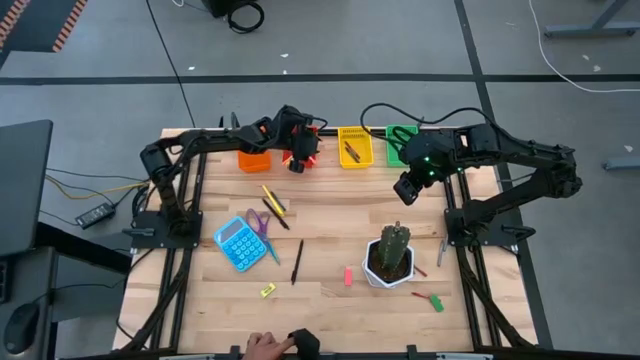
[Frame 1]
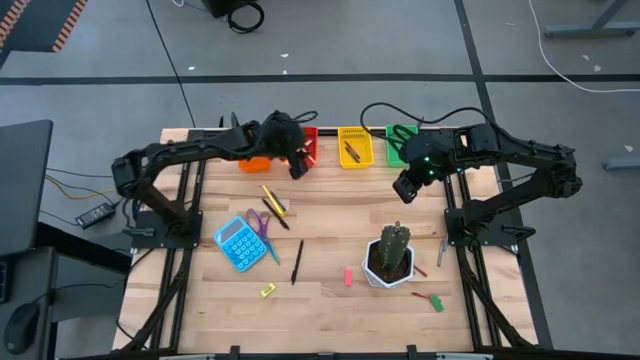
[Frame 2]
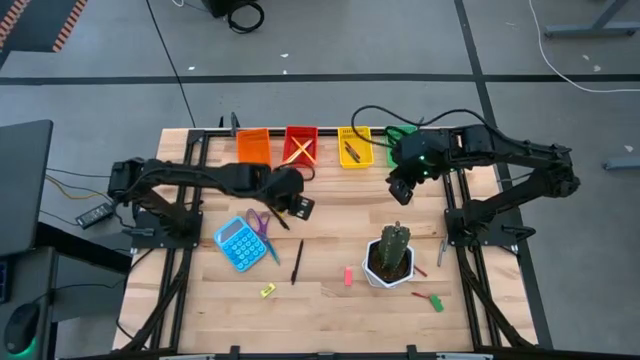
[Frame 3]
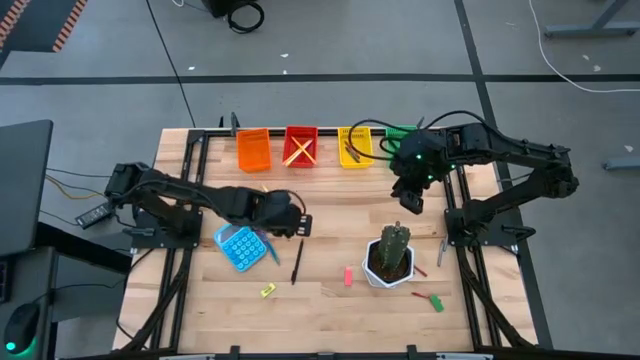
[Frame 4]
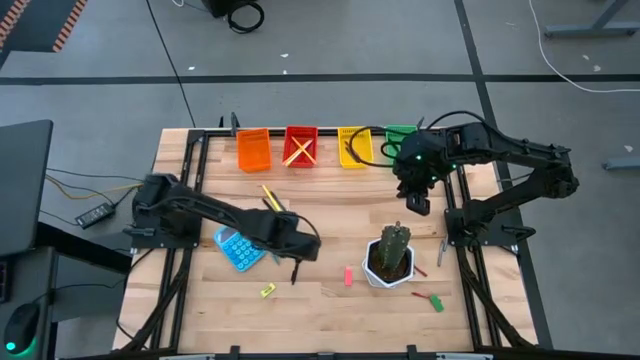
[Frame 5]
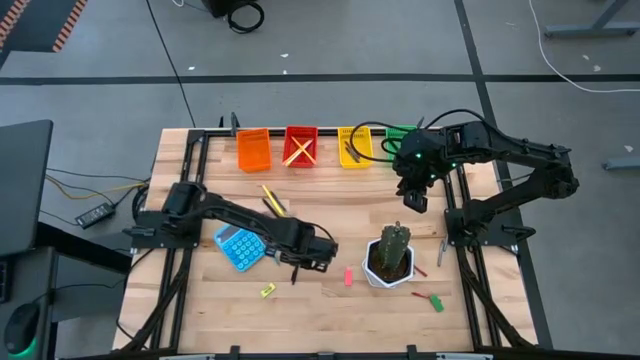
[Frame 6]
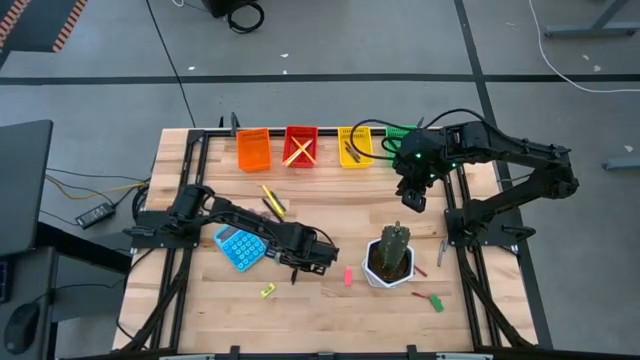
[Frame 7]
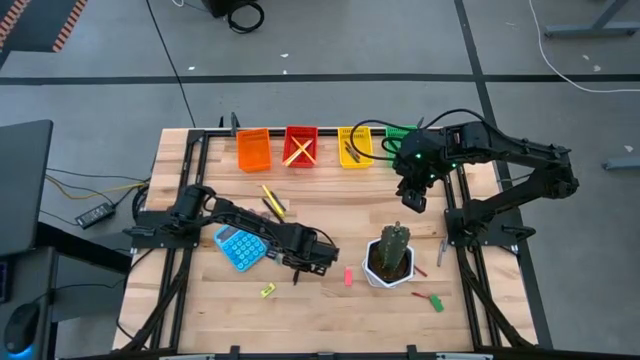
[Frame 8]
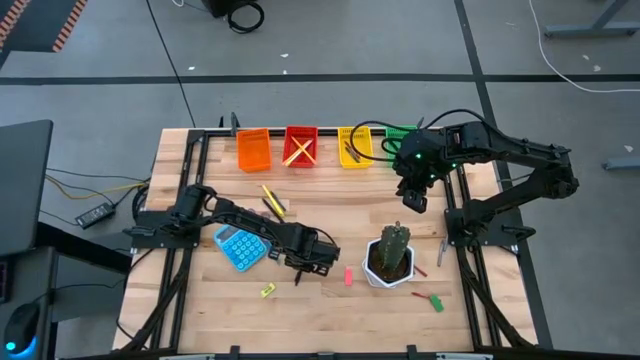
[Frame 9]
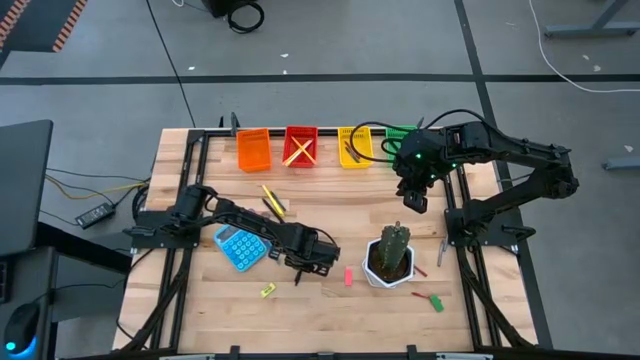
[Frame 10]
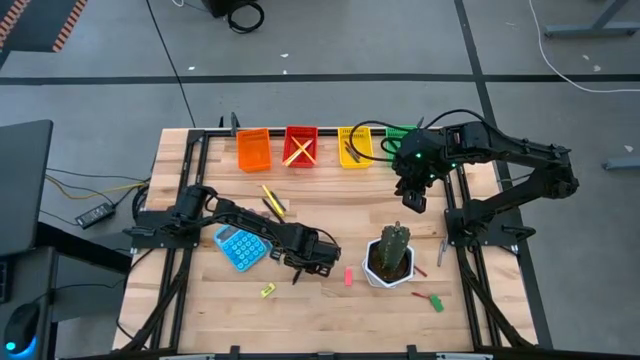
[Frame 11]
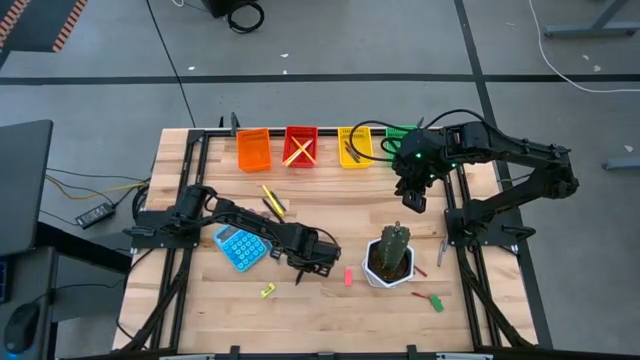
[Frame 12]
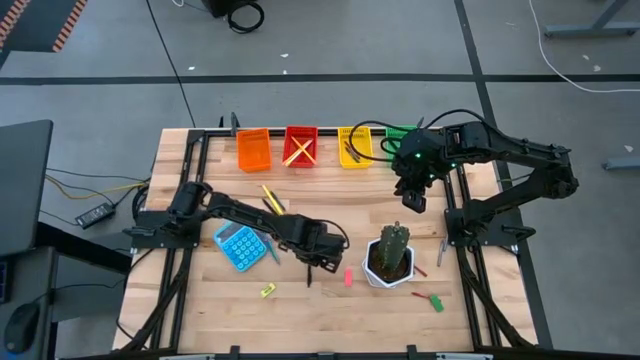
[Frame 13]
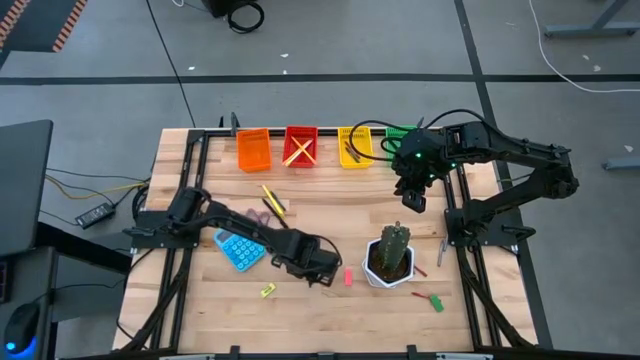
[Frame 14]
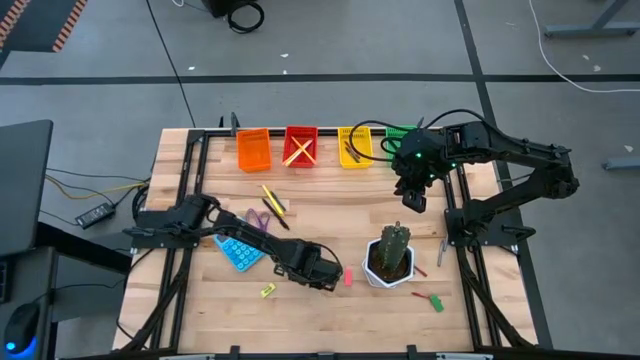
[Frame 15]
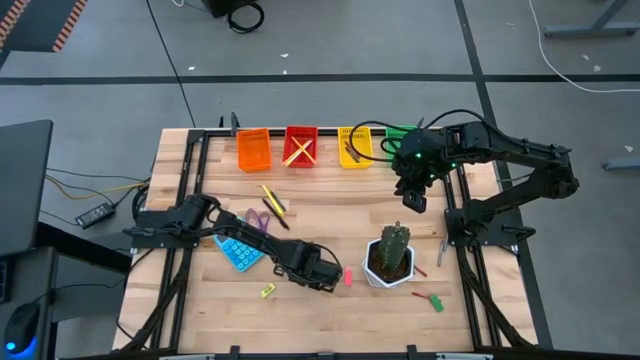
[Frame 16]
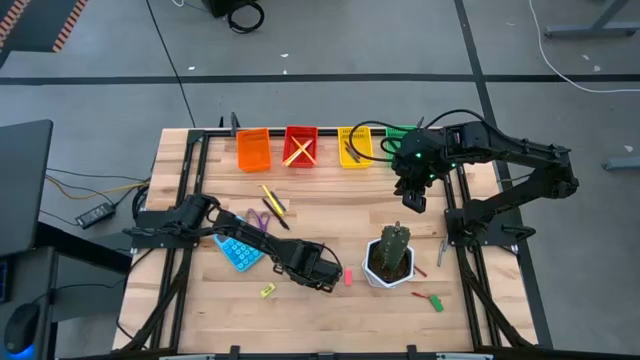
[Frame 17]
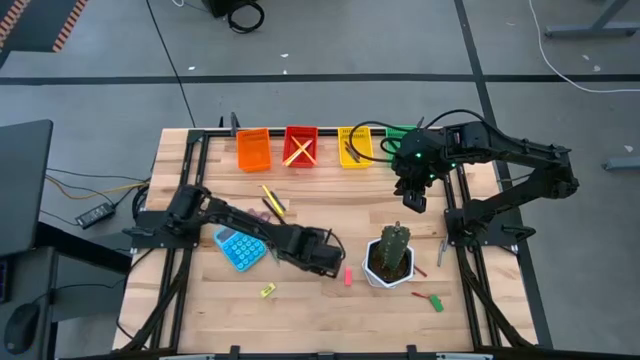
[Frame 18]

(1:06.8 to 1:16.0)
Task: Sort crayons/erasers/pens/pencils in bins
Put the bottom black pen into the green bin

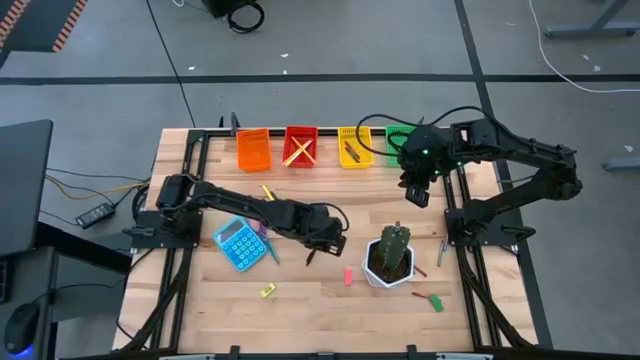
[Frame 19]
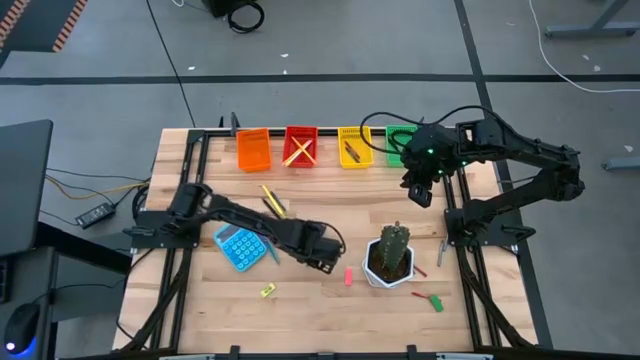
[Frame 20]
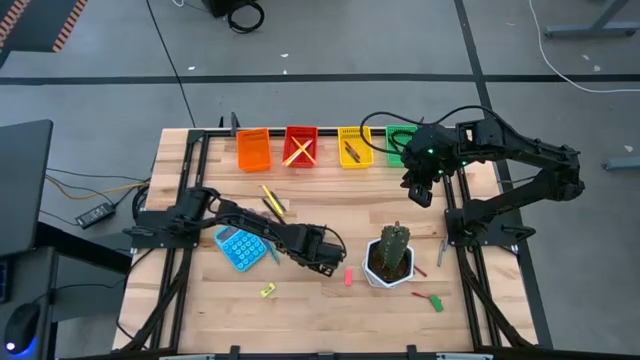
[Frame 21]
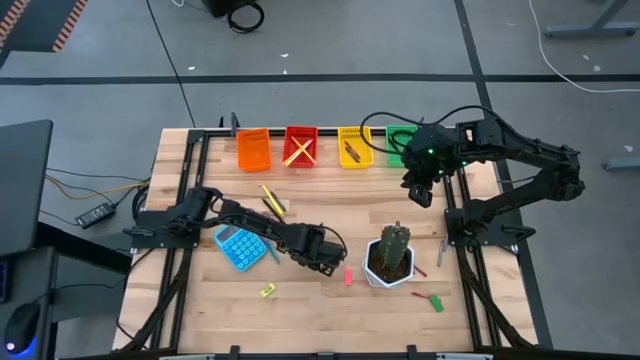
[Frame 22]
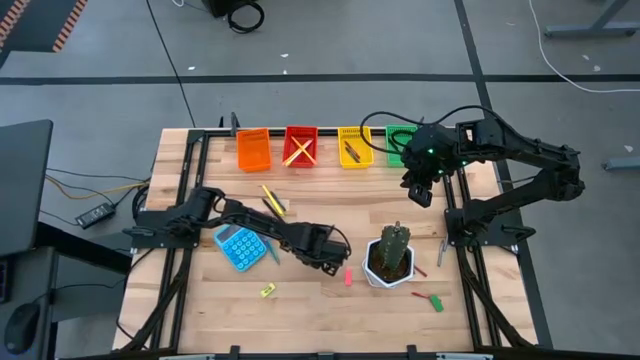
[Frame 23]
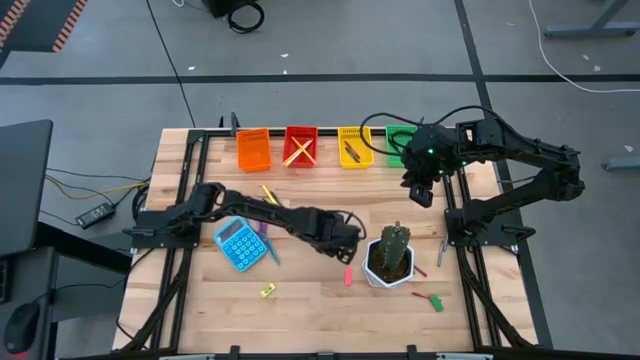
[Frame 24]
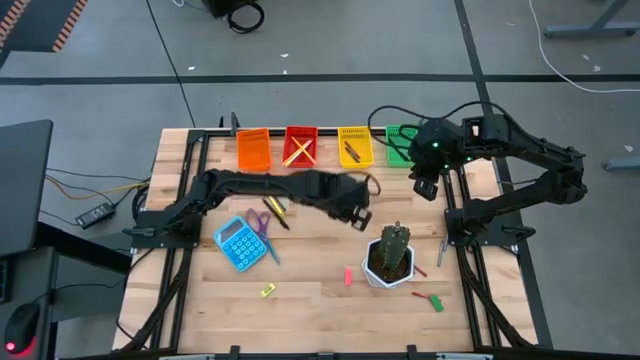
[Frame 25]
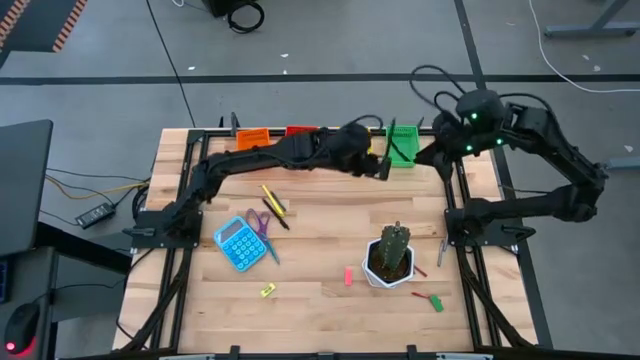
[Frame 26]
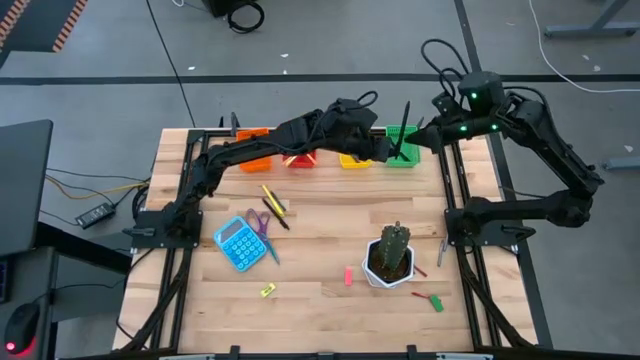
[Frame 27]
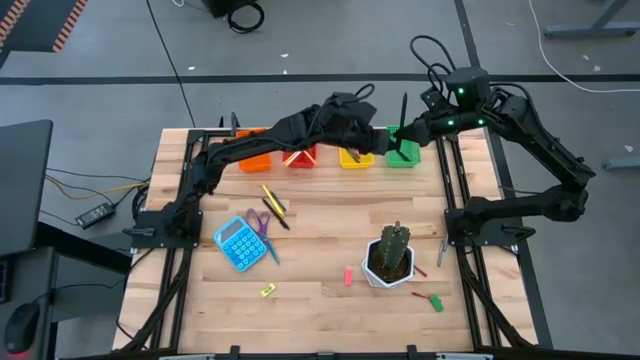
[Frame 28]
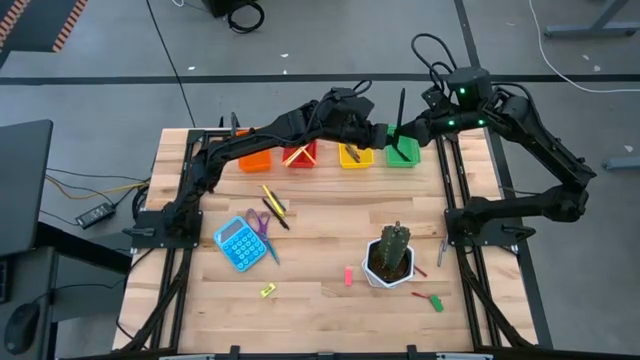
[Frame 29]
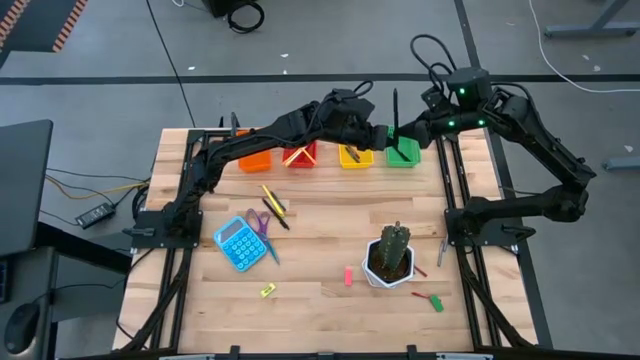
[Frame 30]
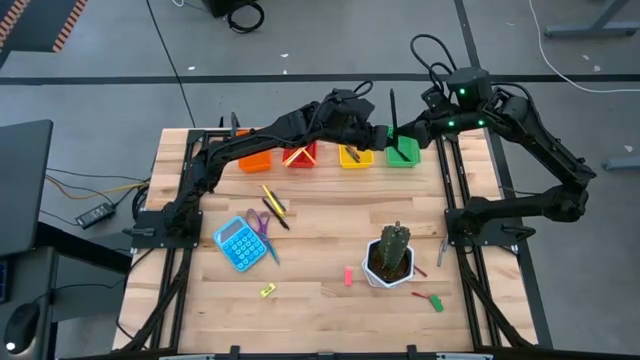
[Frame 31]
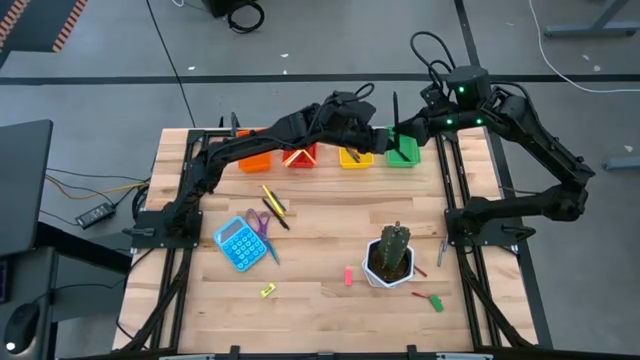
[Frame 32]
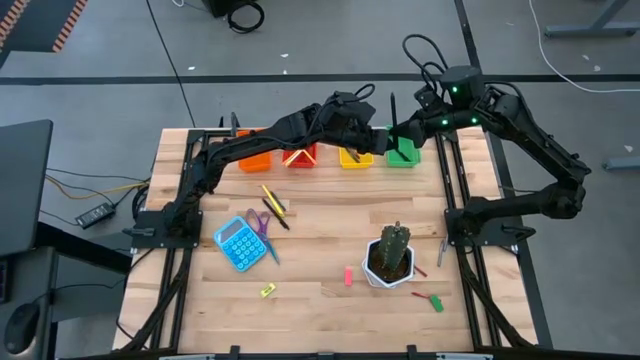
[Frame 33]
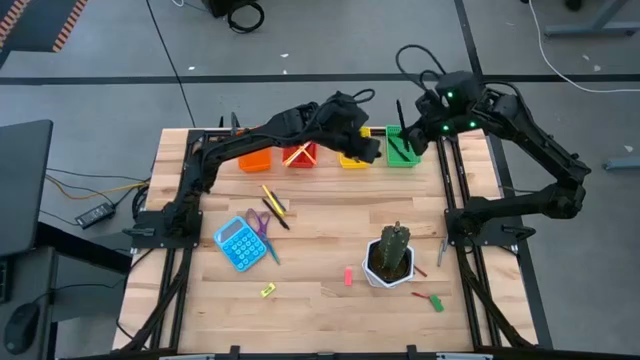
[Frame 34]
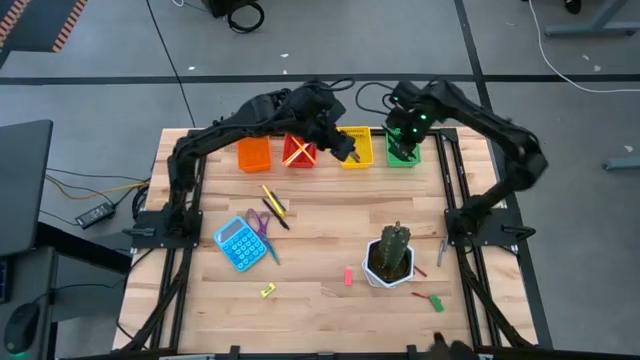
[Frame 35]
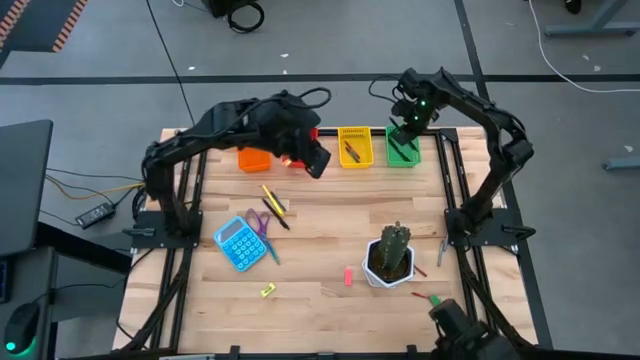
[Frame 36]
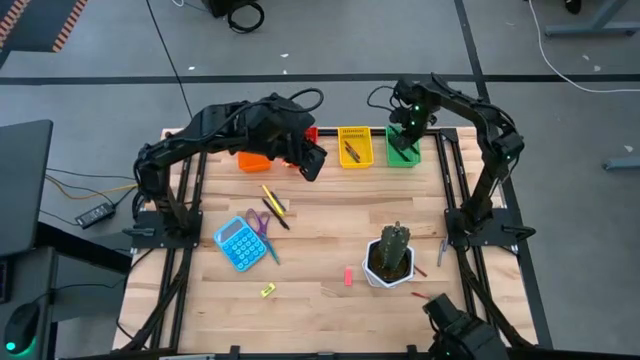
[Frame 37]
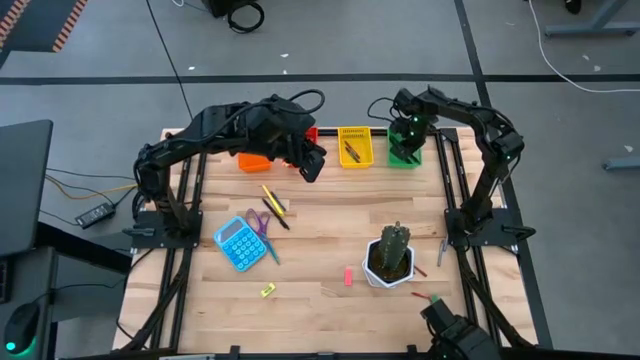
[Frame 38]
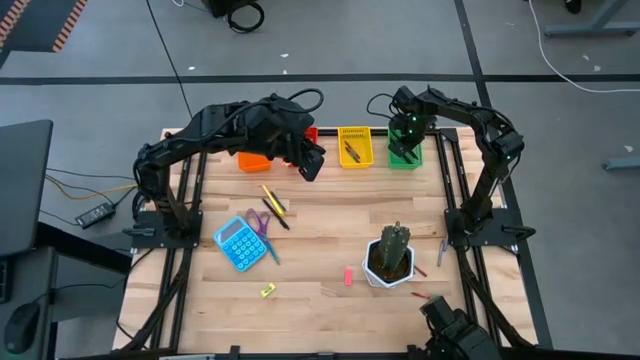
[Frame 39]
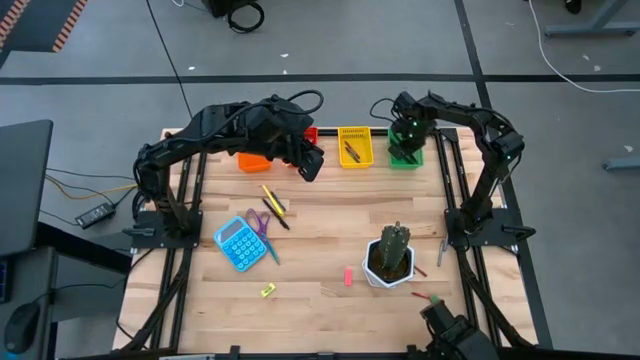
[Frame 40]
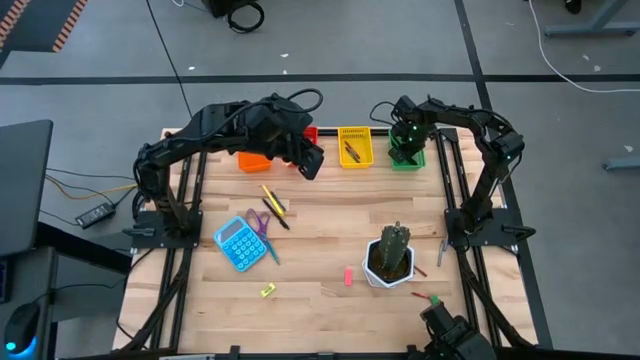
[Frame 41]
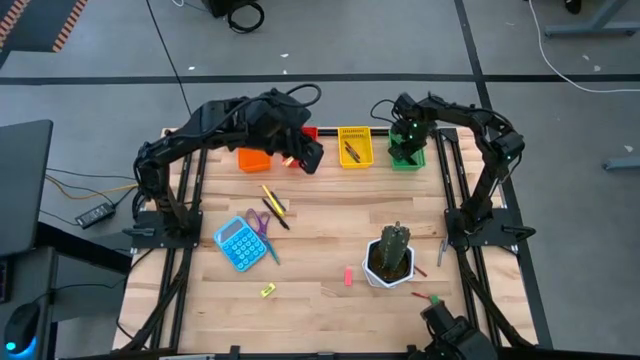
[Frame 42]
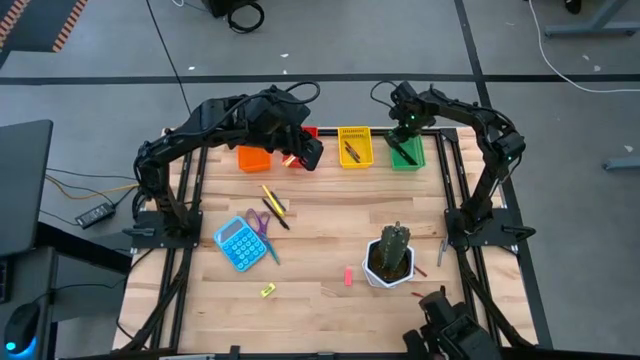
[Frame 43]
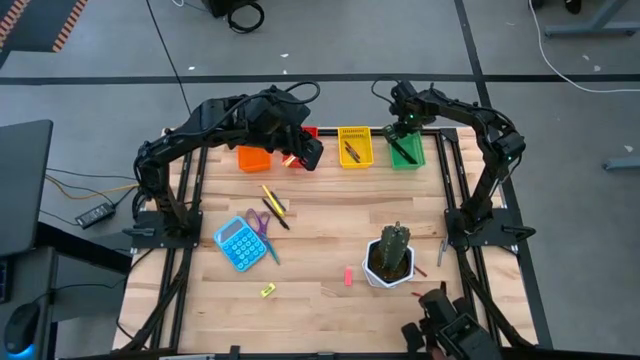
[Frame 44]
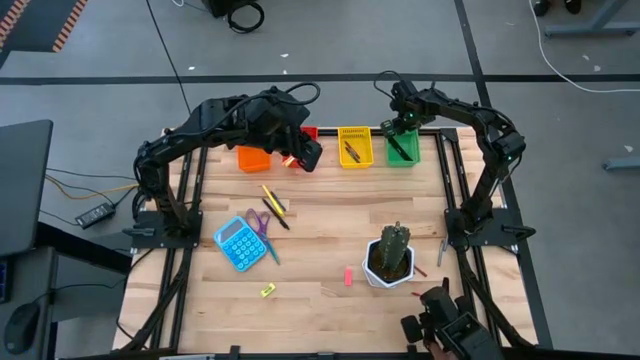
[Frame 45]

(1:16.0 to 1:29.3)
Put the bottom black pen into the green bin
